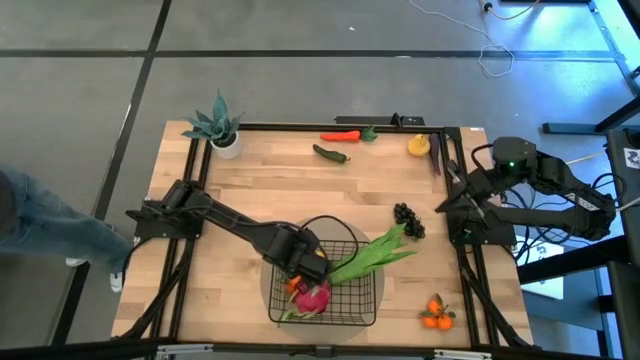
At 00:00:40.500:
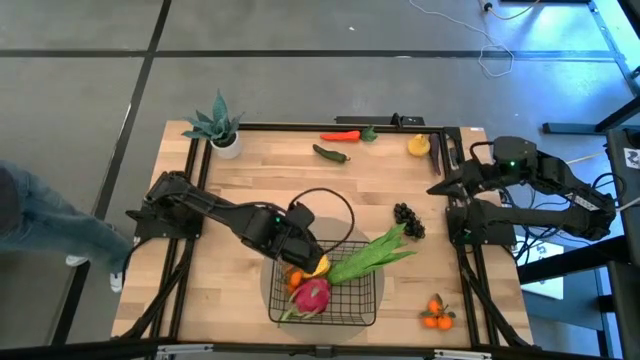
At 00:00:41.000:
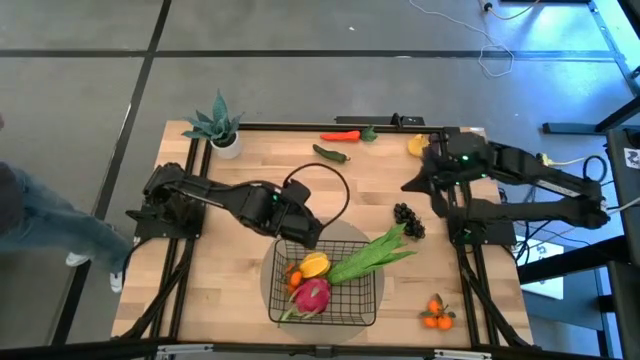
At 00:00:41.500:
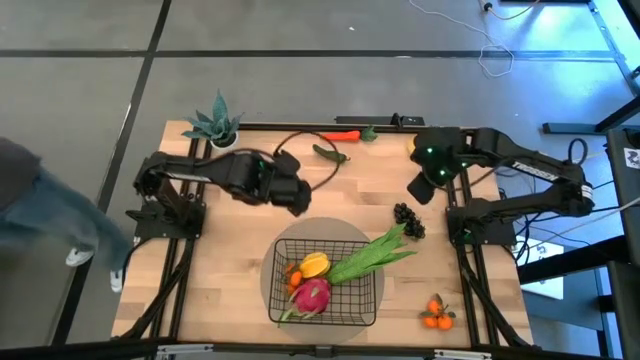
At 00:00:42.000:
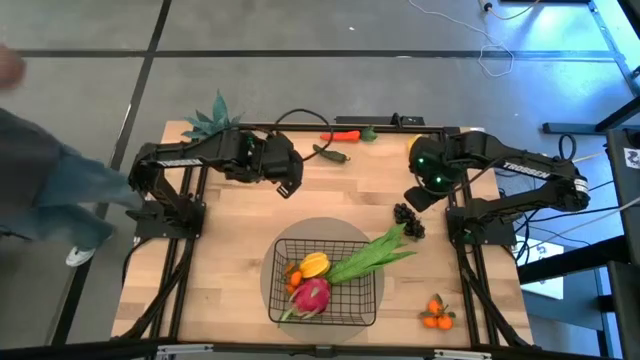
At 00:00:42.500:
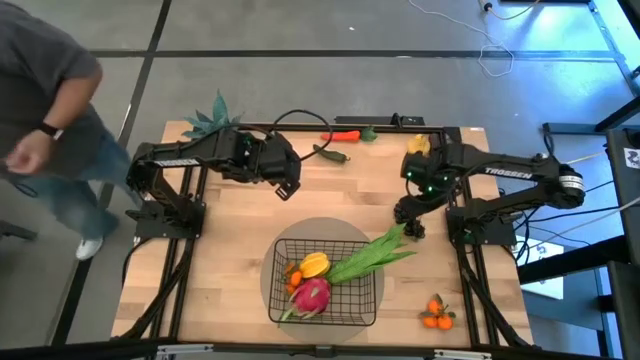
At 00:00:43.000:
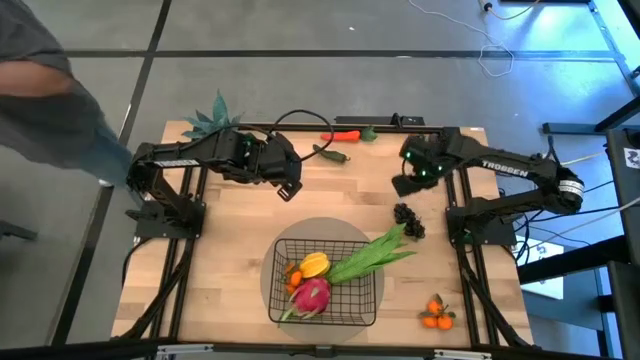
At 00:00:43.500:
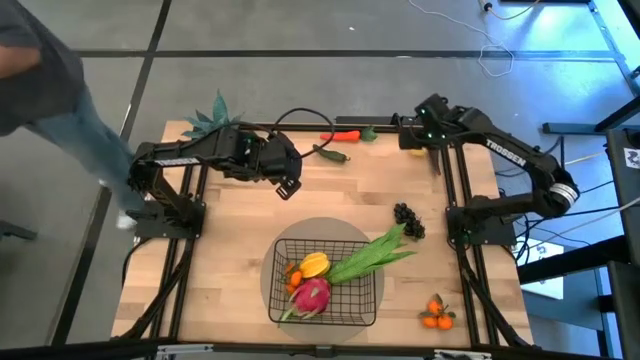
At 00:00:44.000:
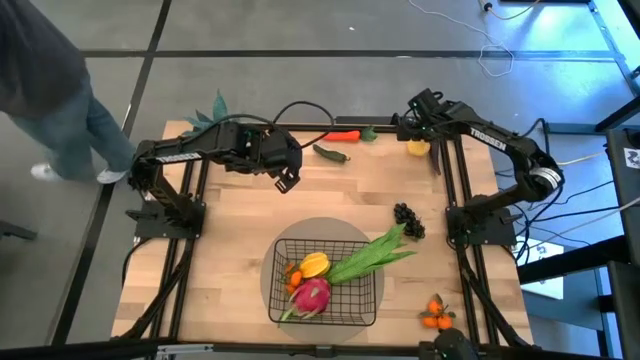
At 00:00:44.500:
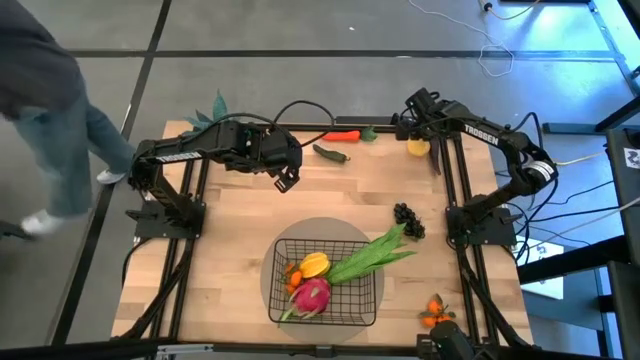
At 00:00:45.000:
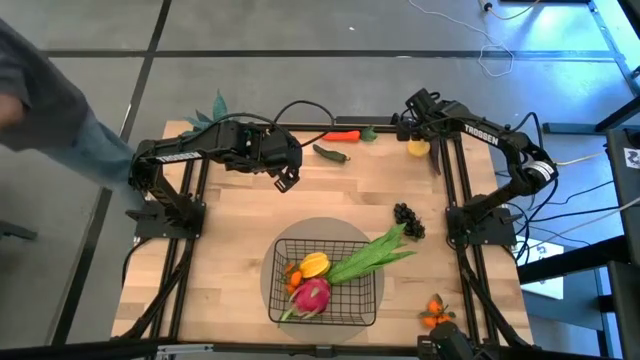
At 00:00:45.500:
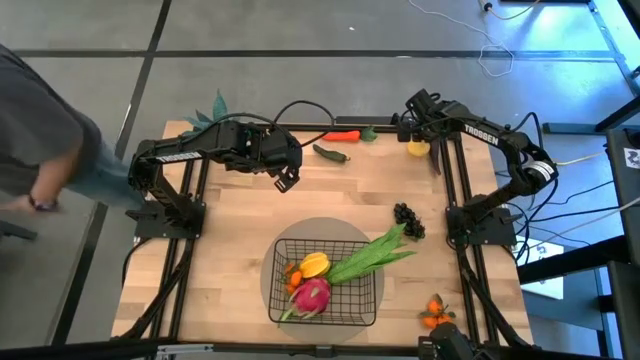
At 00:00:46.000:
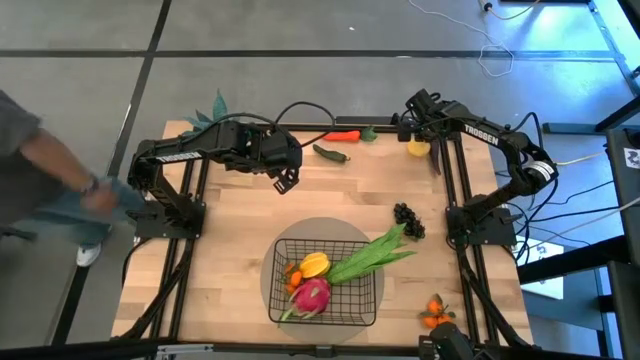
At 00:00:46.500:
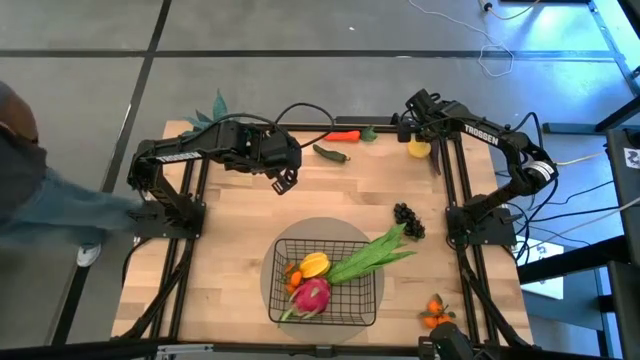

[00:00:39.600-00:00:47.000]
Task: Build produce basket
Put the pear into the black mesh basket

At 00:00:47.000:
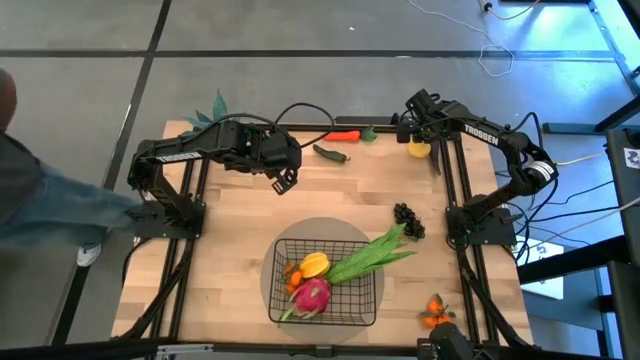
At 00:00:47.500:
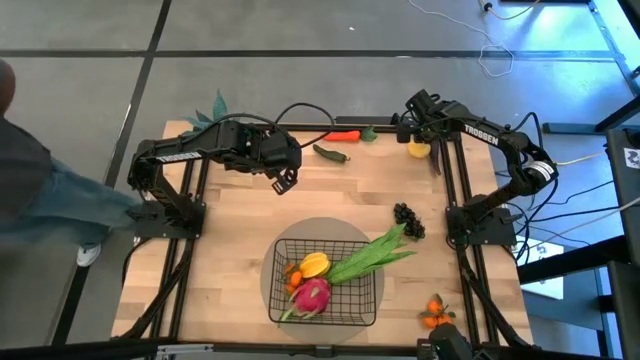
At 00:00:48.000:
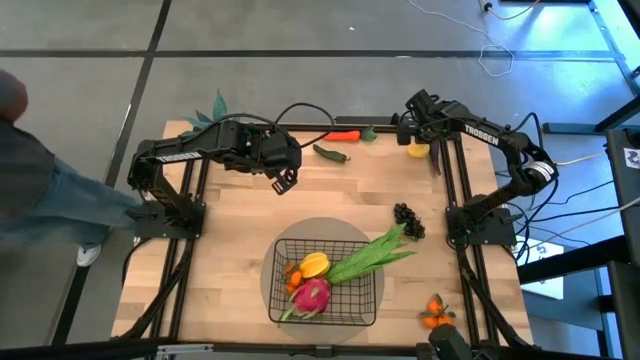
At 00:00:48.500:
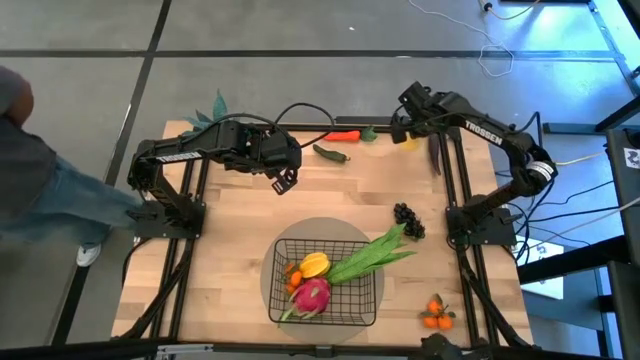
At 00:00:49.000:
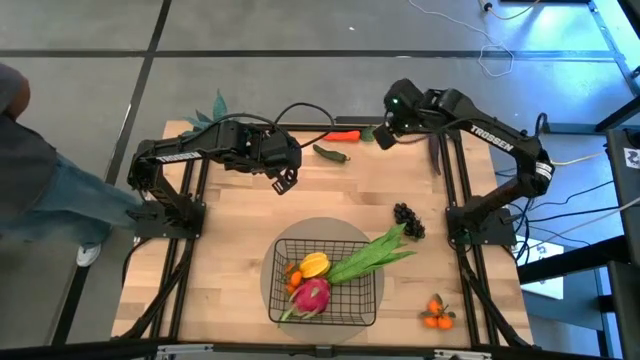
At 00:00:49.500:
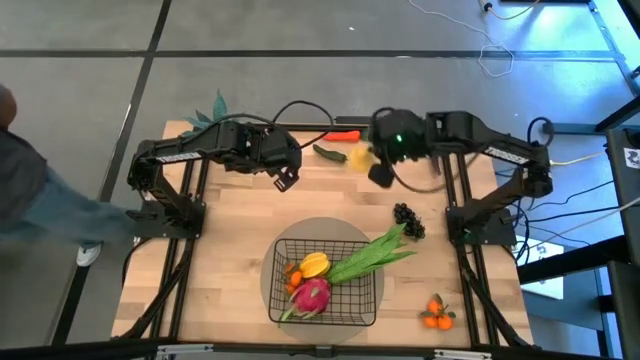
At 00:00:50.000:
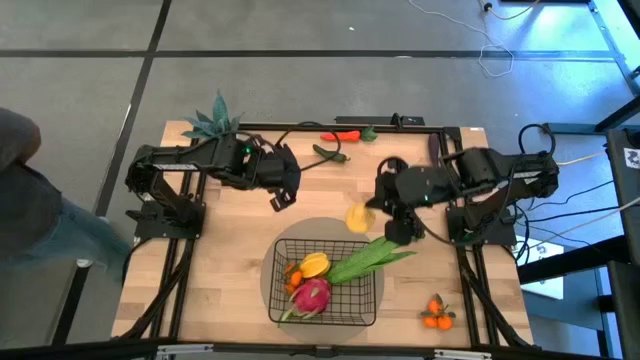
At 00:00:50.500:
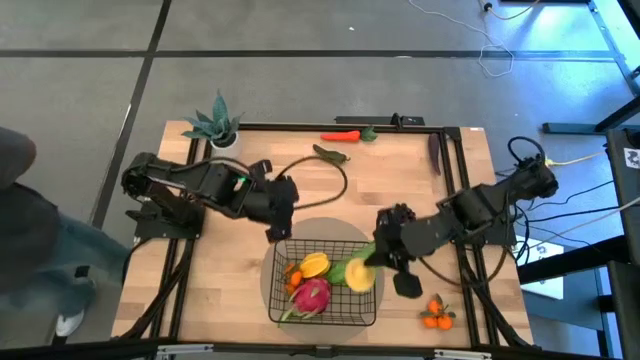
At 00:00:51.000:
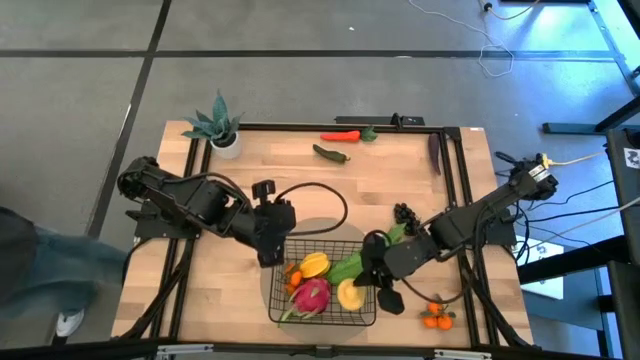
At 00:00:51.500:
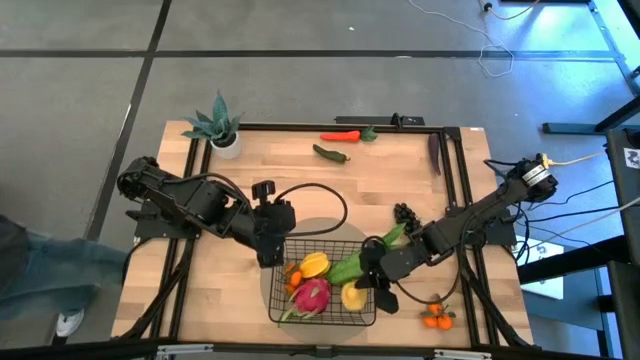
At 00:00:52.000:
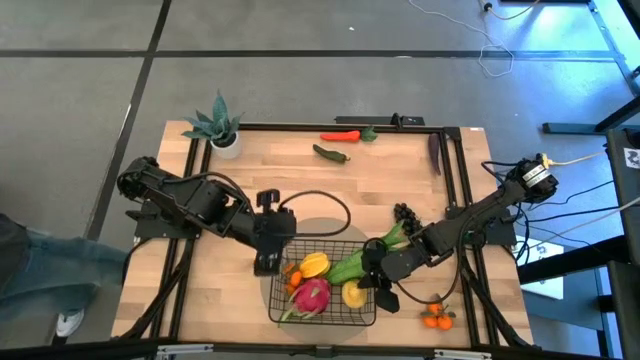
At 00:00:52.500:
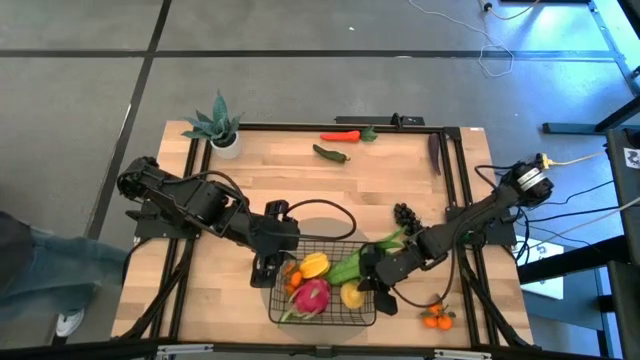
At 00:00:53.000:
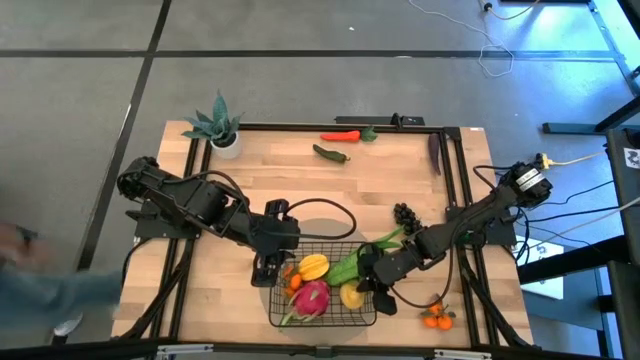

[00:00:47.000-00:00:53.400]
Put the pear into the black mesh basket

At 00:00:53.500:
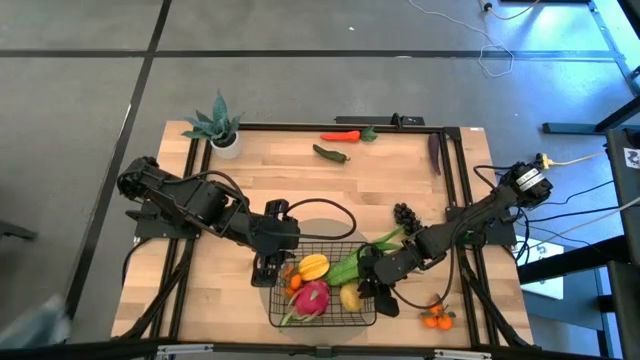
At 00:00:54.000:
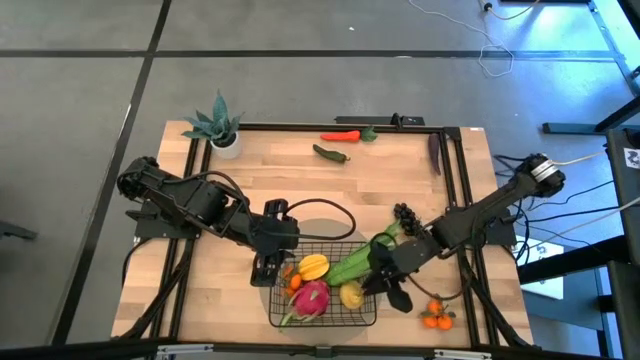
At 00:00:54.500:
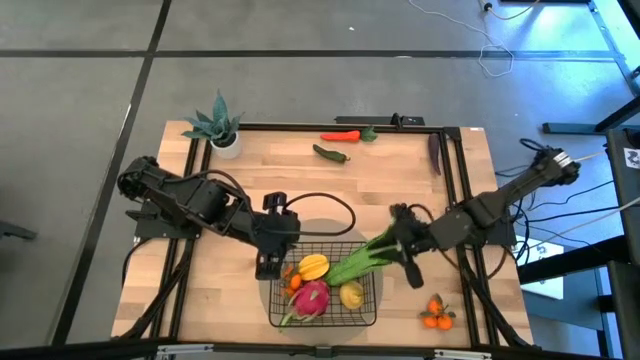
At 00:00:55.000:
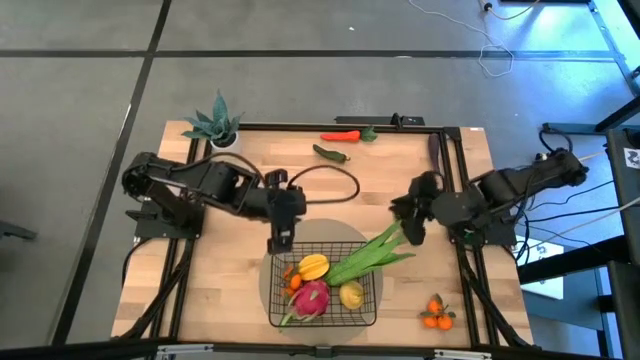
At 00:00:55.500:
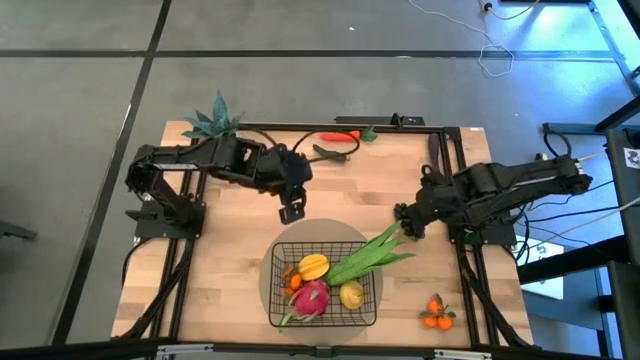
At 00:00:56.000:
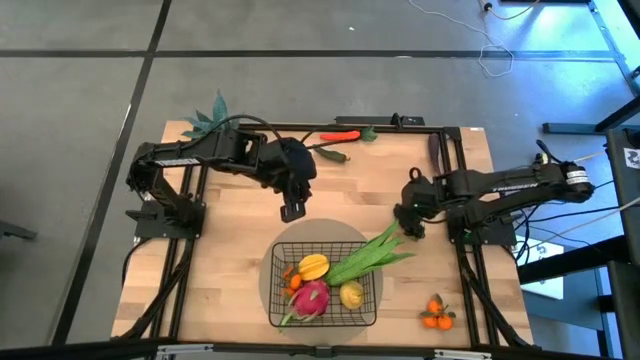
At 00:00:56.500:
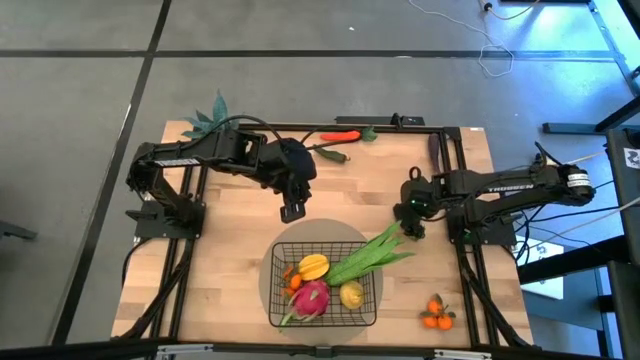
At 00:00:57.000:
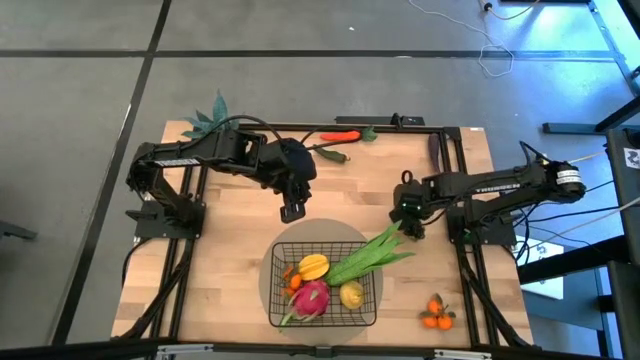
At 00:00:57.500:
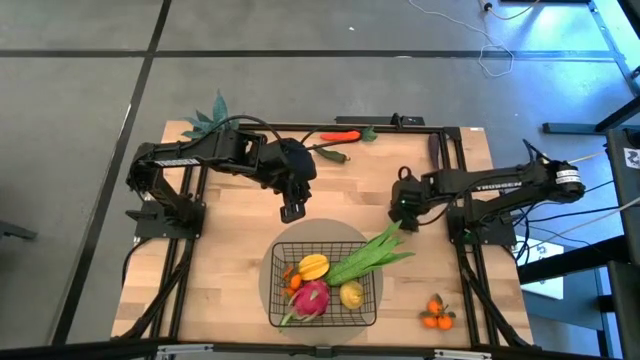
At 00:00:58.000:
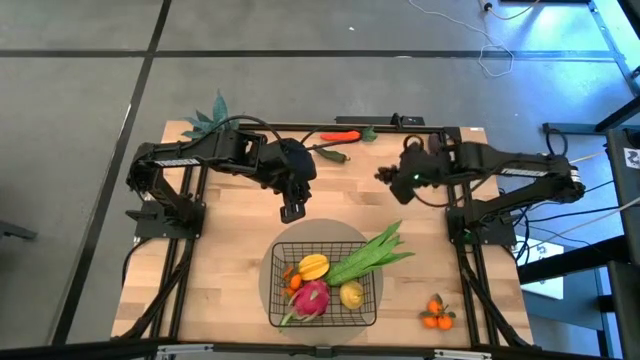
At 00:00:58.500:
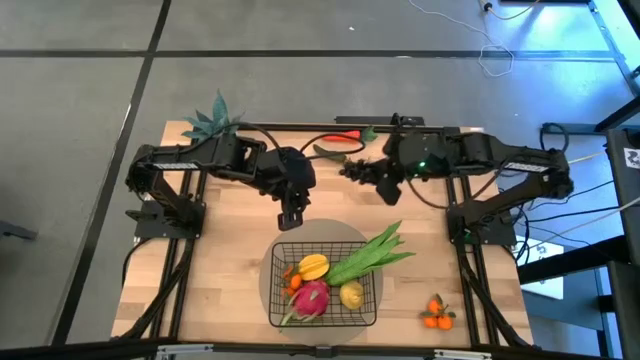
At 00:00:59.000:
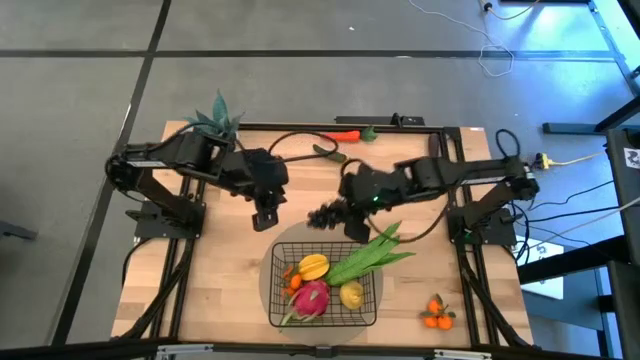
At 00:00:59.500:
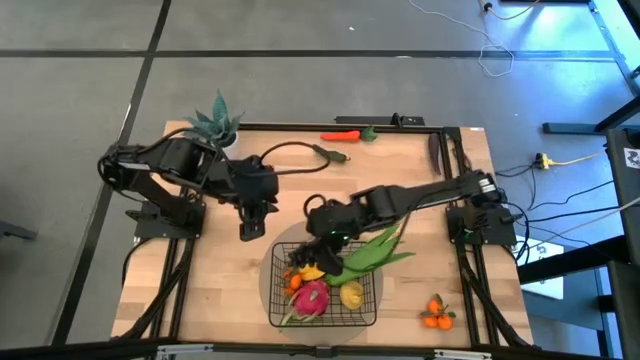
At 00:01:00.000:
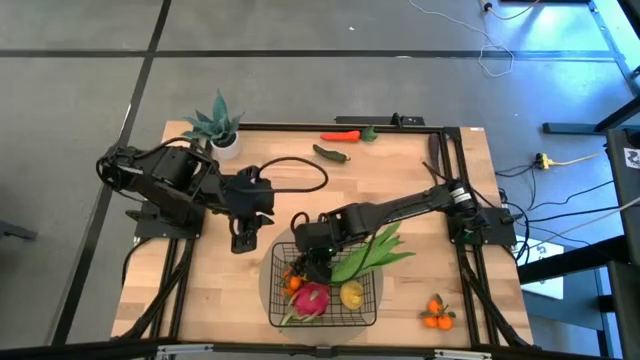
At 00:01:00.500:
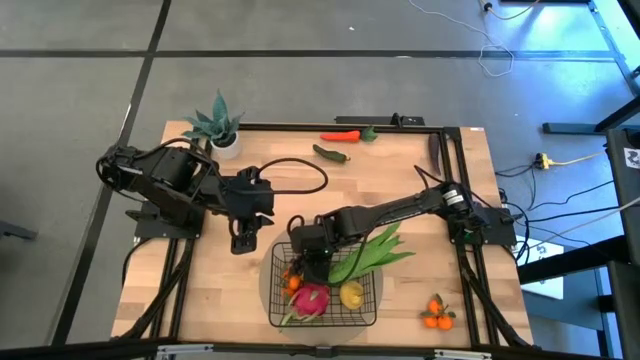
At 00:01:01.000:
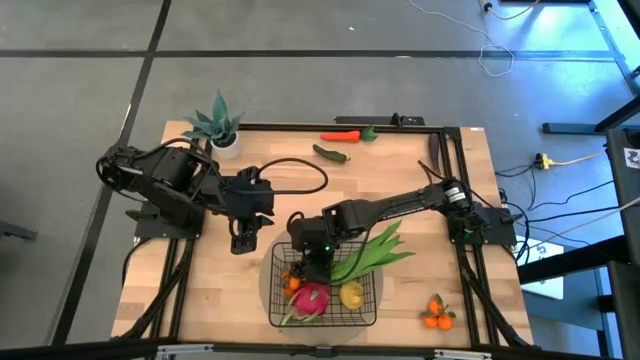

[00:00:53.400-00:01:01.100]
Put the bunch of grapes into the black mesh basket
